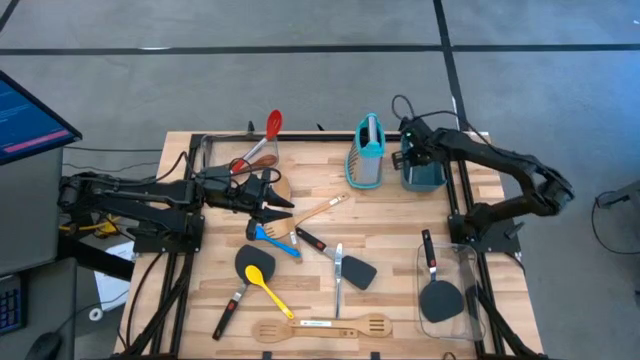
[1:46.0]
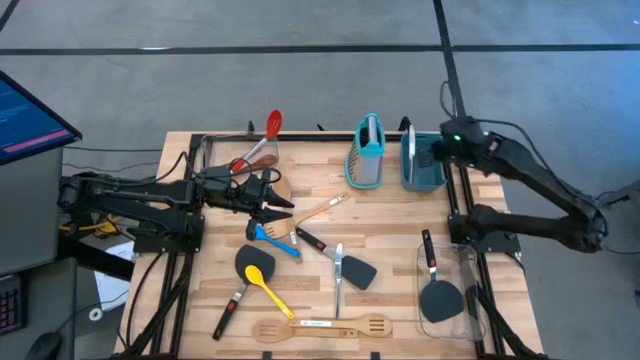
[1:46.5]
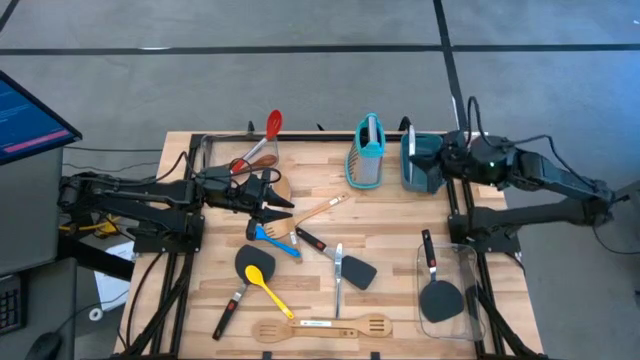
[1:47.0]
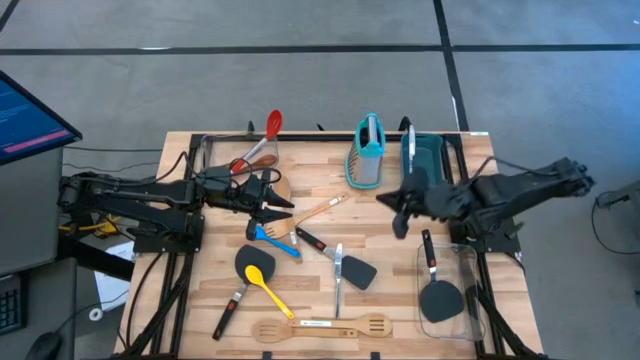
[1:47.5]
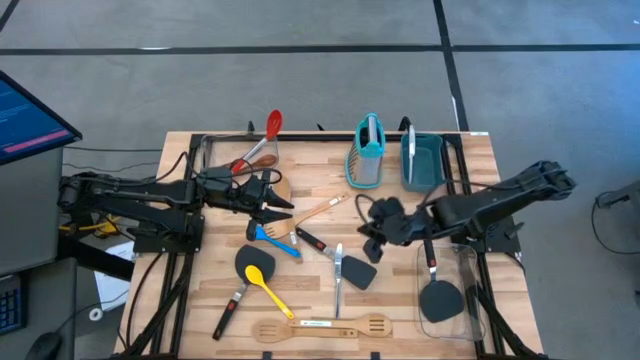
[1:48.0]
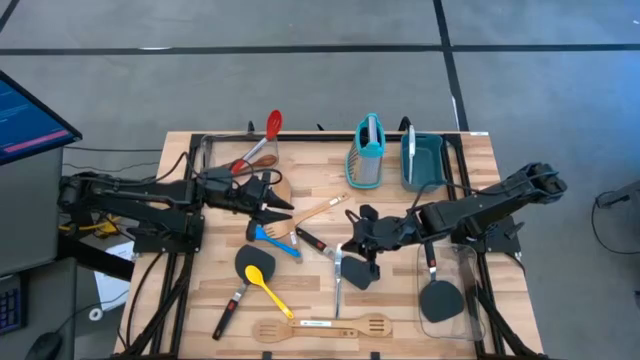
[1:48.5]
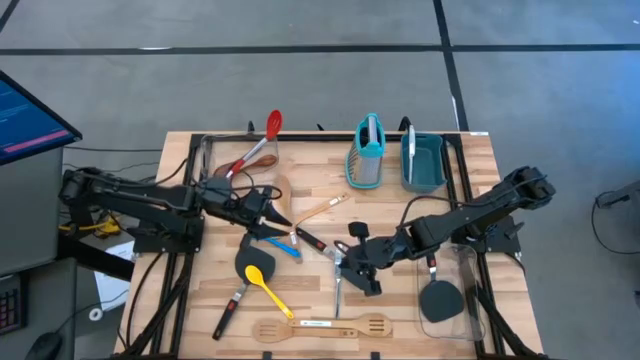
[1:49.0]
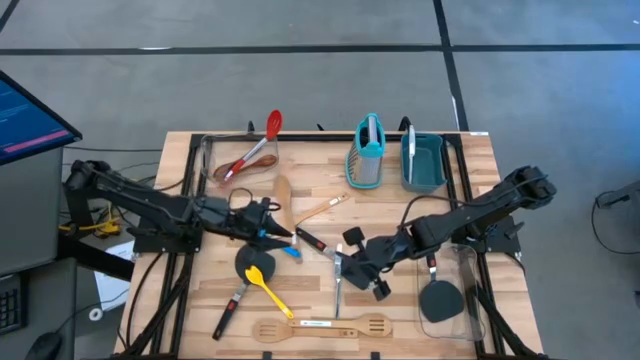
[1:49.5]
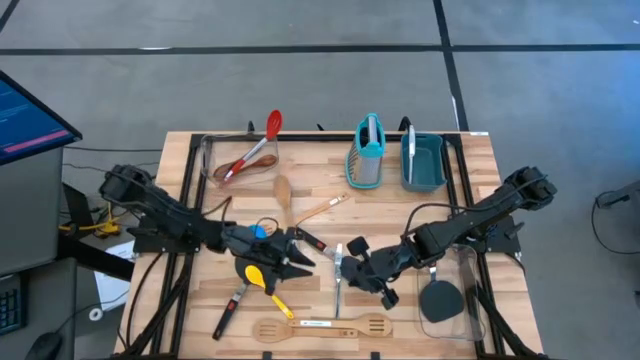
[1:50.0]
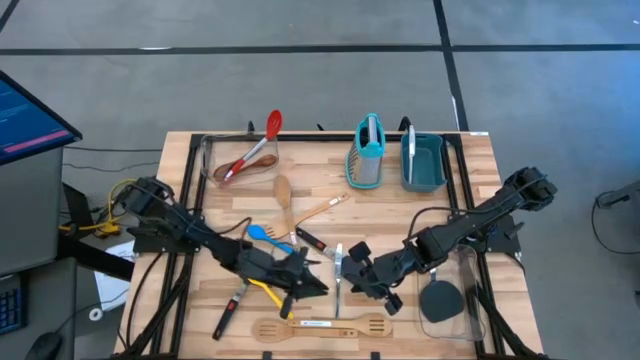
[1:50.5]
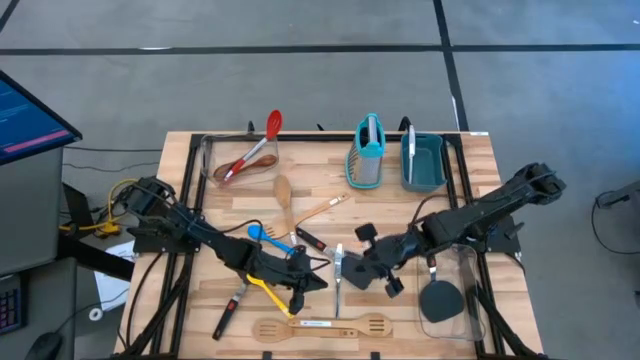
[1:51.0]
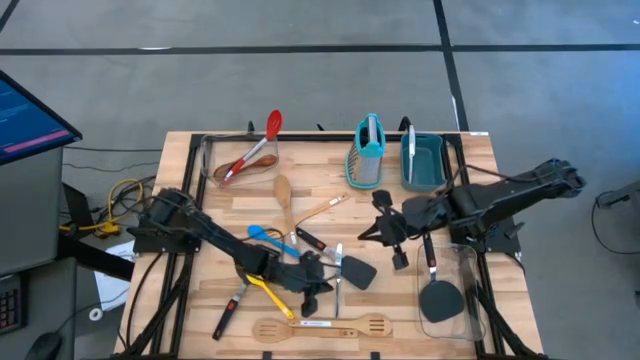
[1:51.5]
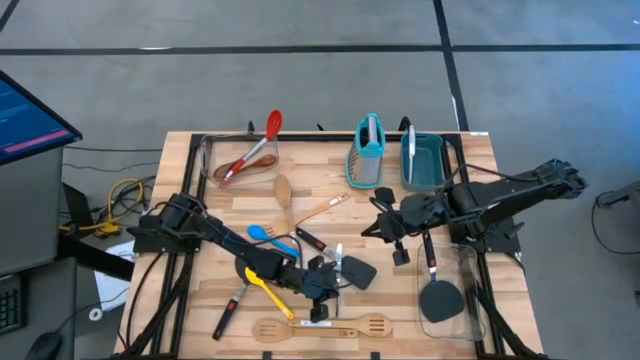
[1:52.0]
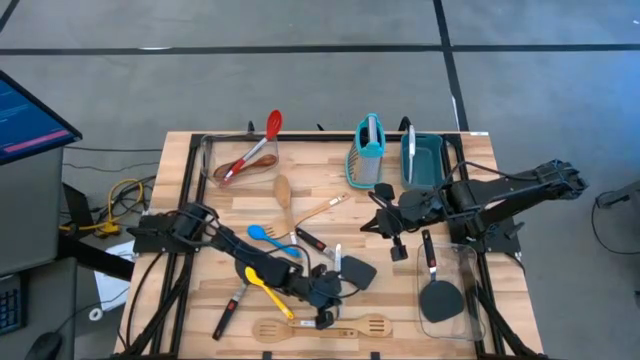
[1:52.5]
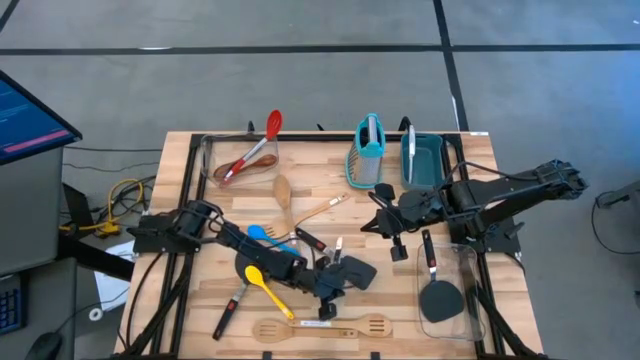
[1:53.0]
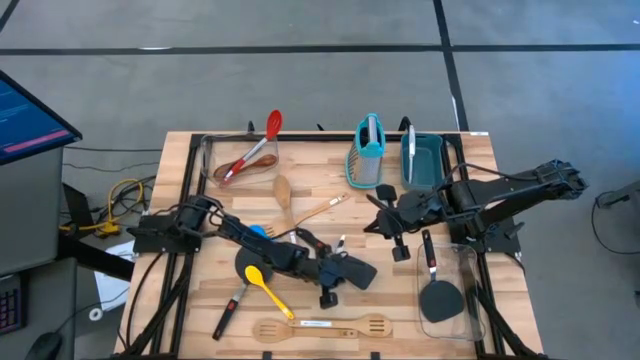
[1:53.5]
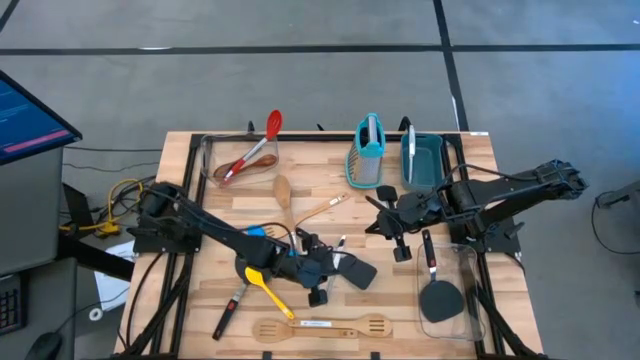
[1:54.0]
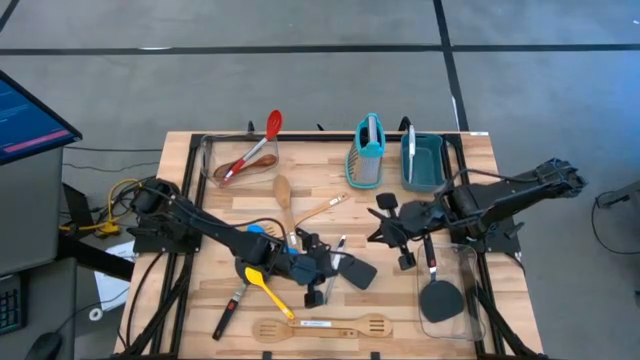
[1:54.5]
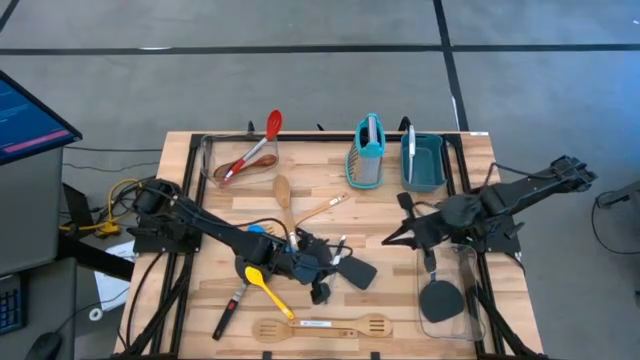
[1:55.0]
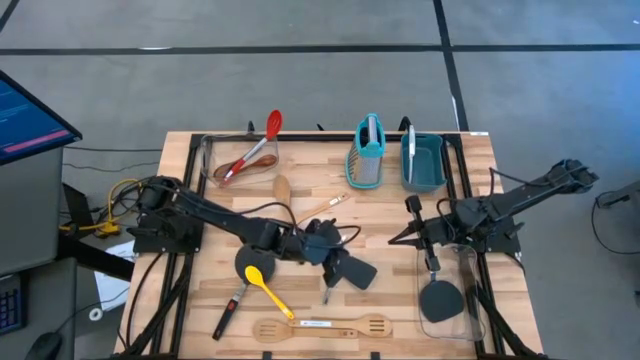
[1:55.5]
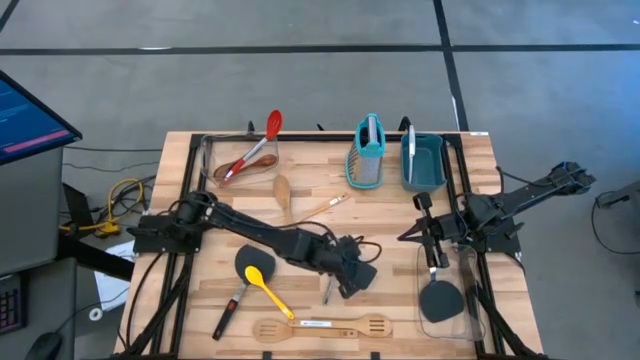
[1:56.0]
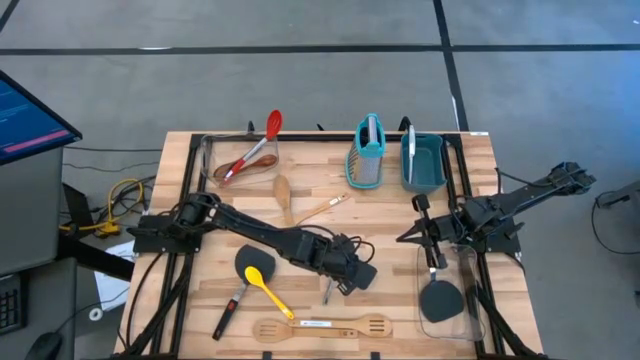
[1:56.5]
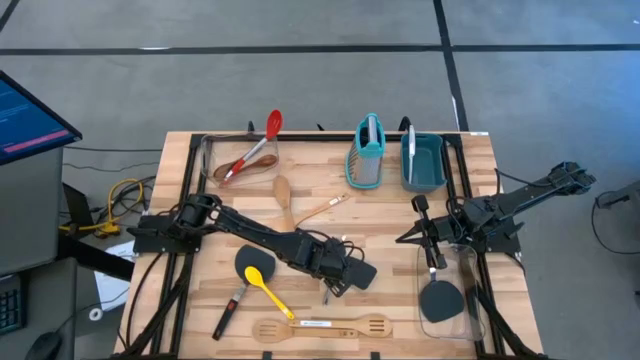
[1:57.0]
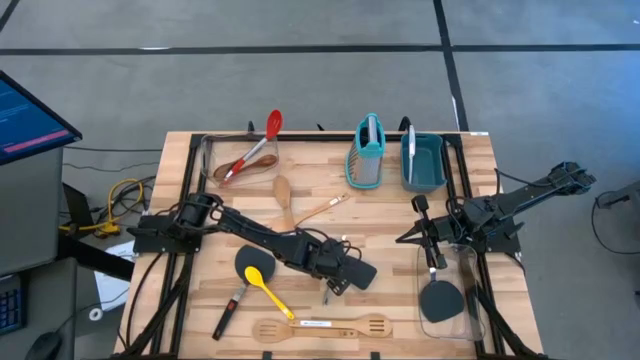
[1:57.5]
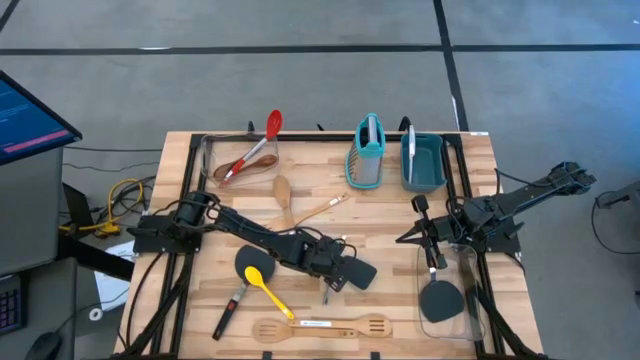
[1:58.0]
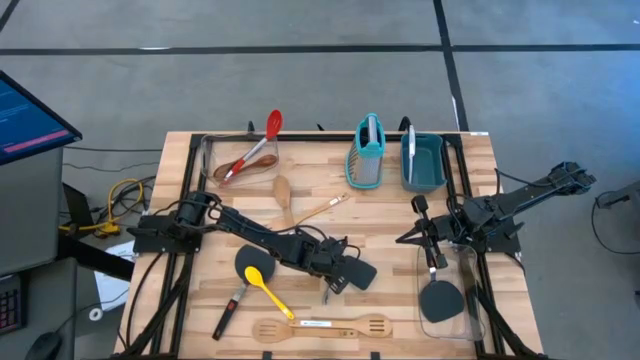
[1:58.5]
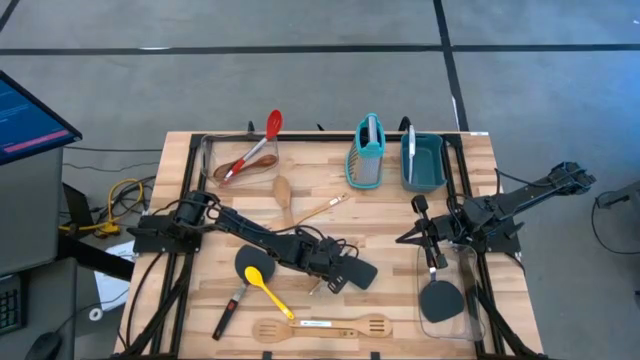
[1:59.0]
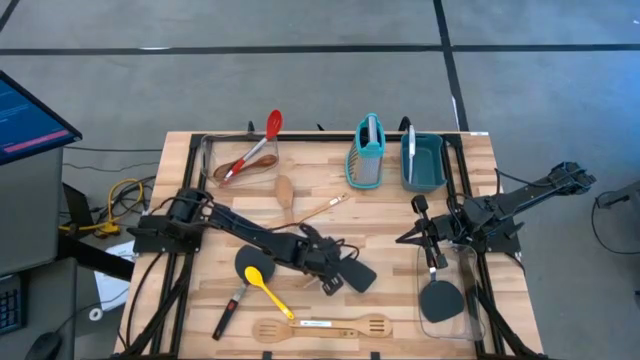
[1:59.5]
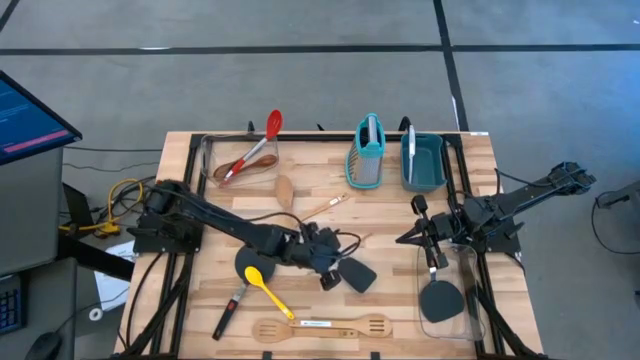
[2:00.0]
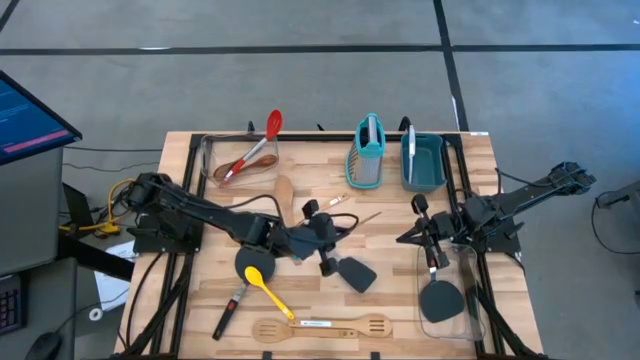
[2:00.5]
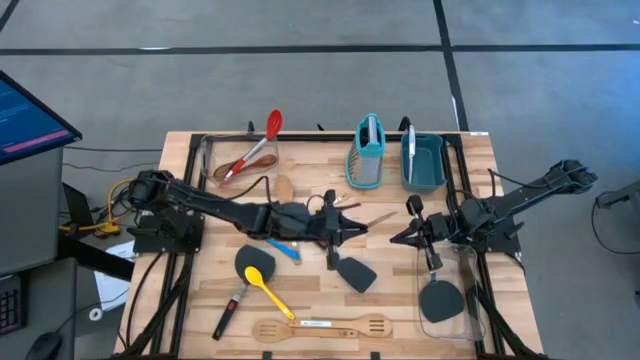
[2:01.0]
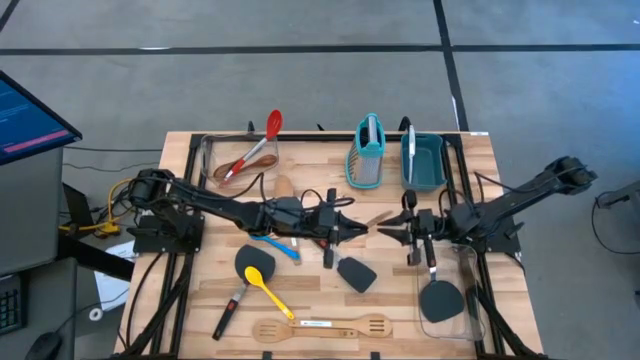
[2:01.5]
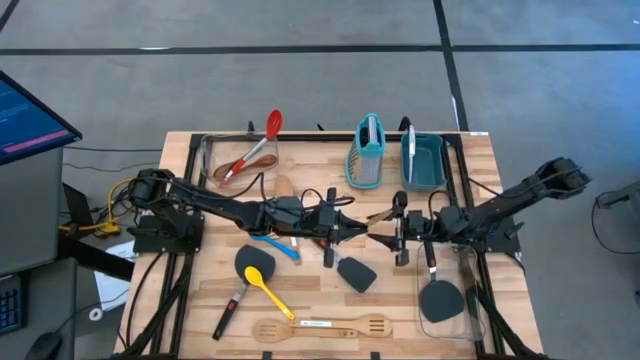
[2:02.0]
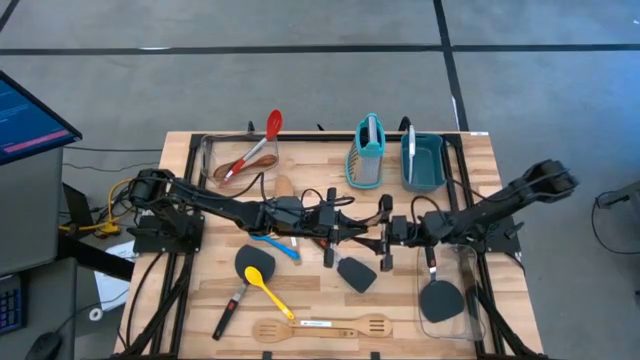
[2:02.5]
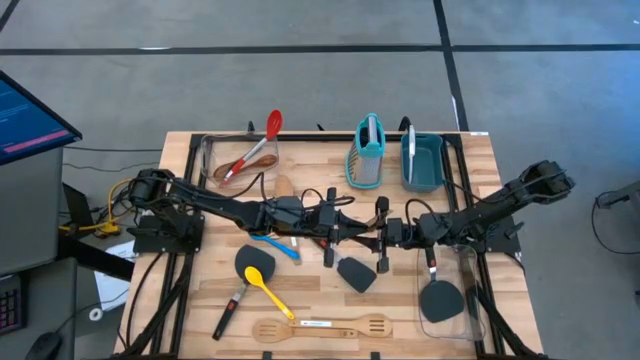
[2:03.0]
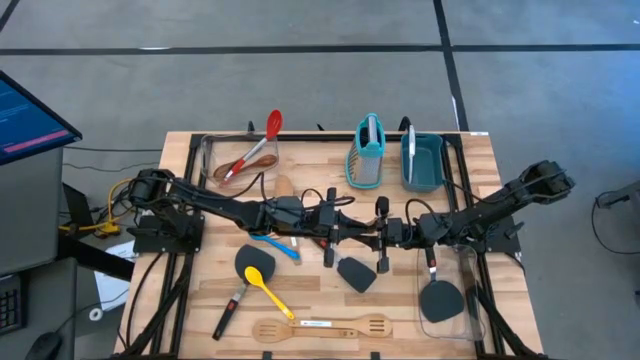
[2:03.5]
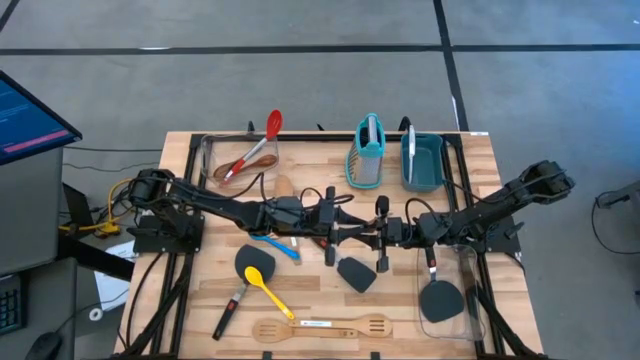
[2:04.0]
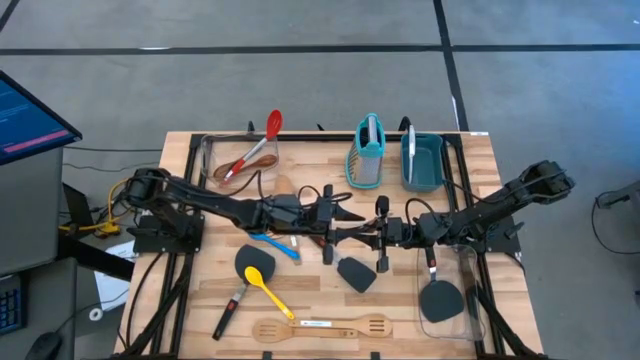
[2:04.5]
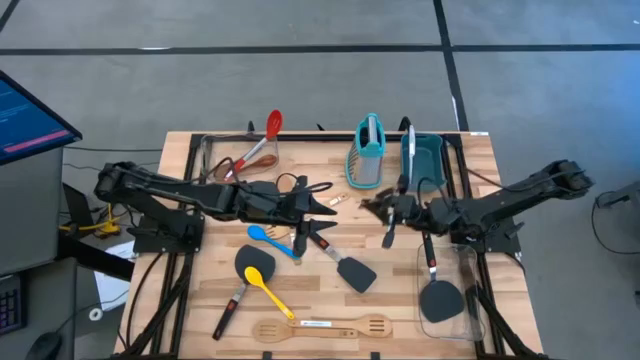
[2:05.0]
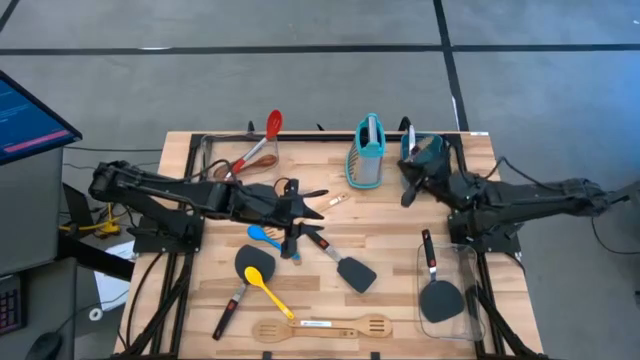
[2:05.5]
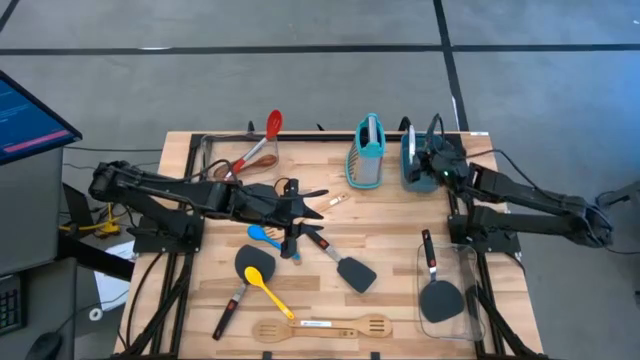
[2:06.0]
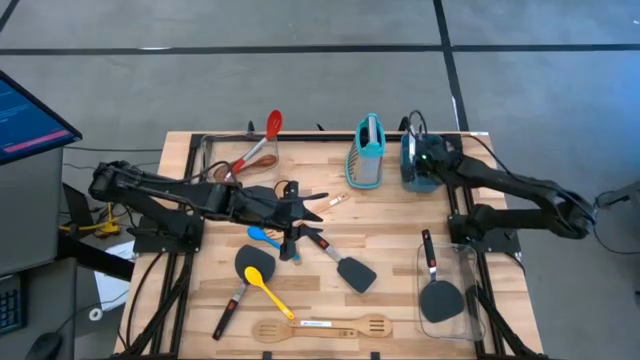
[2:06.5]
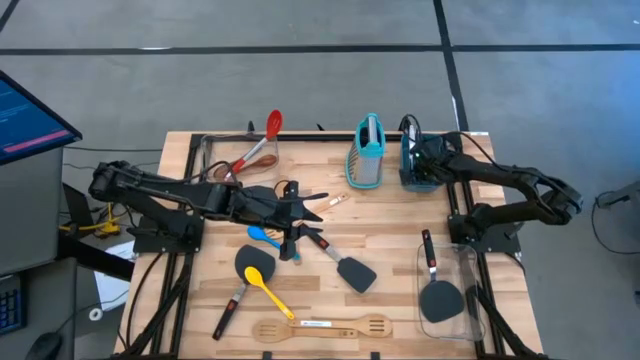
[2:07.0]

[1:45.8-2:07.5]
Task: Pick & Place Kitchen Items
Put the silver knife into the green bin
